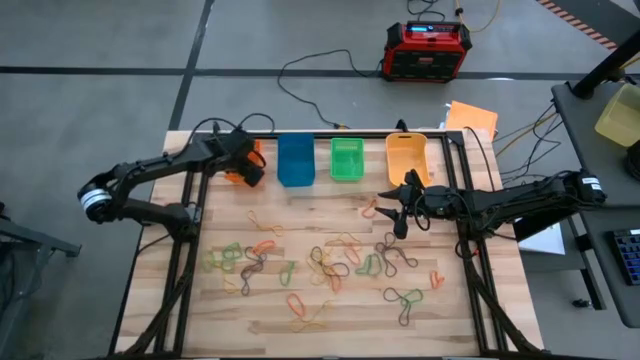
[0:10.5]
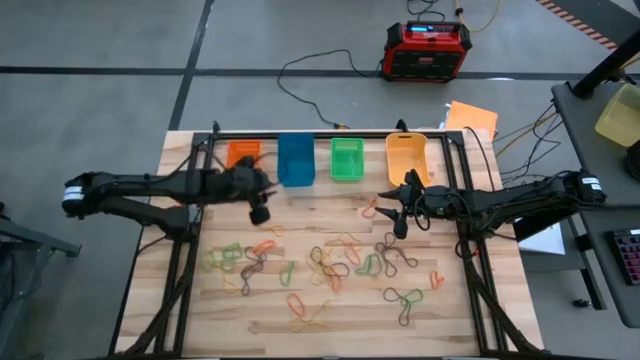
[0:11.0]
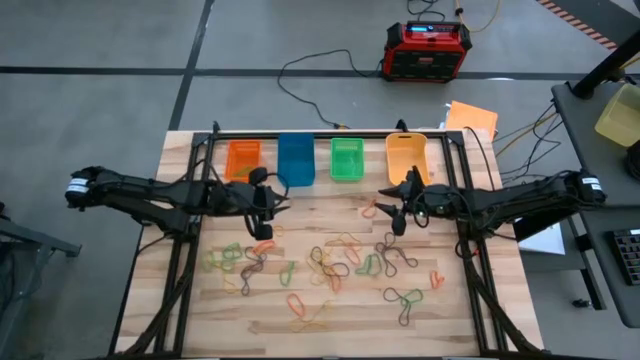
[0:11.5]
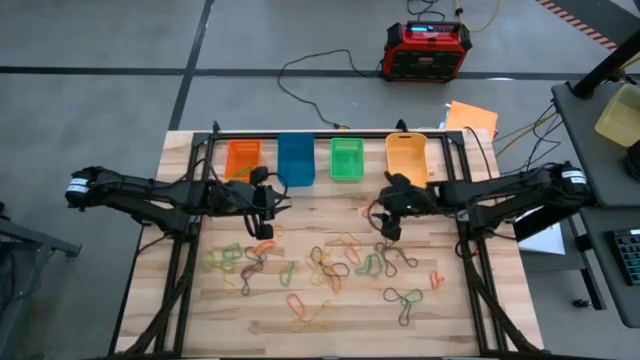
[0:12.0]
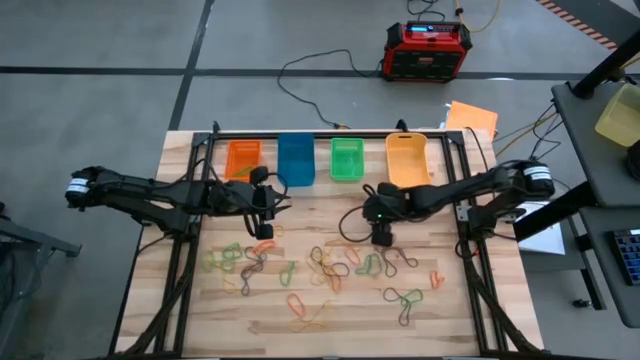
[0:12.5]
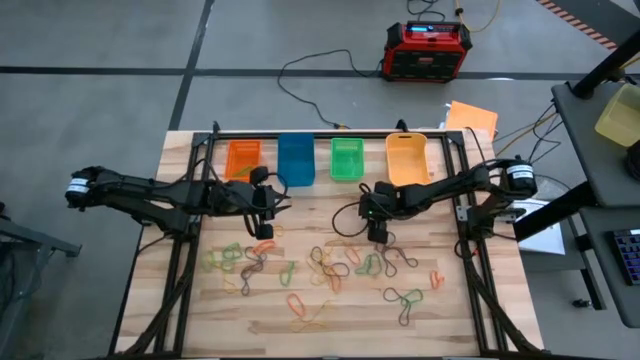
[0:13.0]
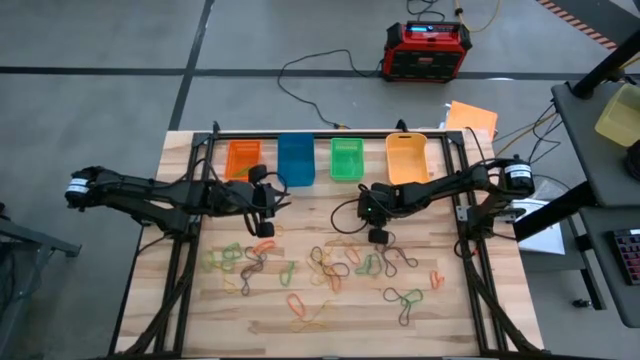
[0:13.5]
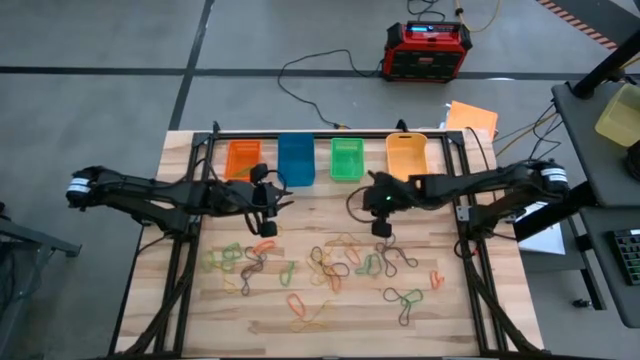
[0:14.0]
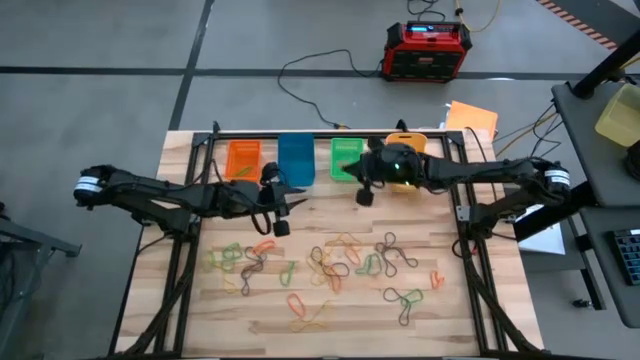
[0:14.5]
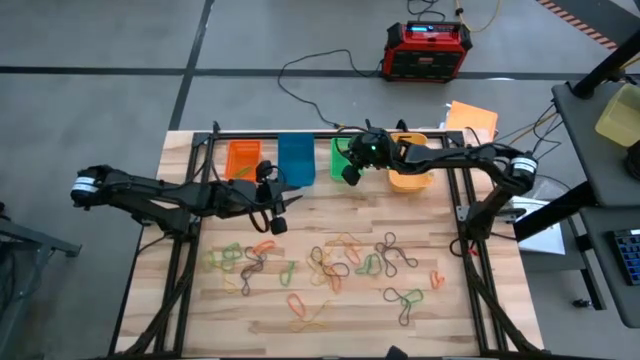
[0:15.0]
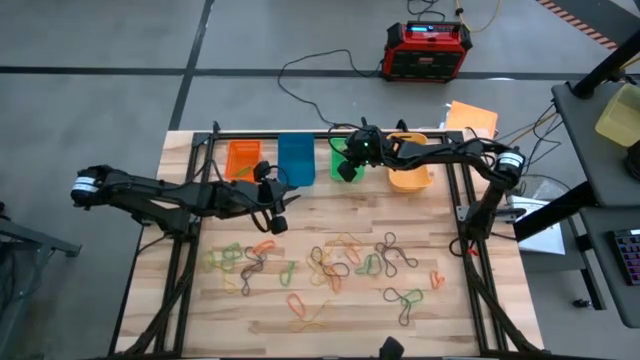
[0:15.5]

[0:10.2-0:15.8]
Task: Sort rubber bands into baskets
Put the orange rubber band into the green bin

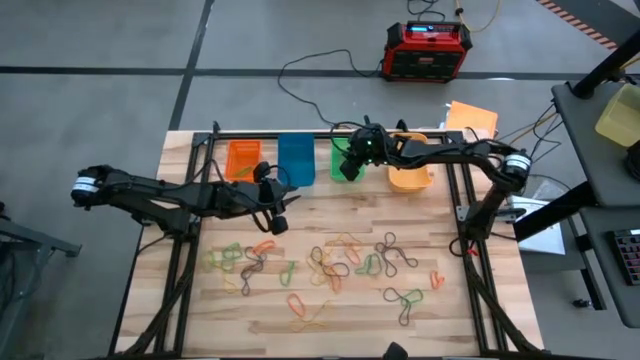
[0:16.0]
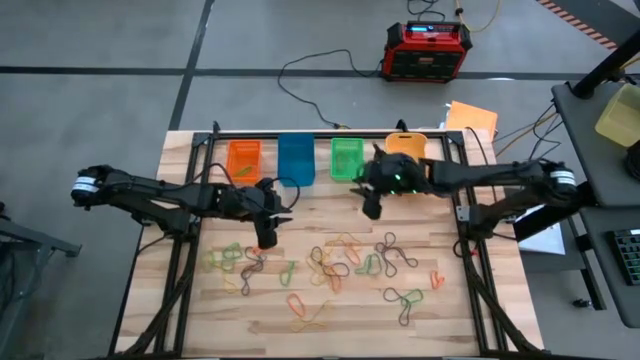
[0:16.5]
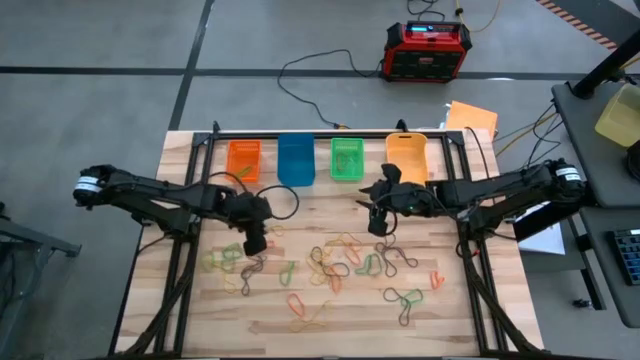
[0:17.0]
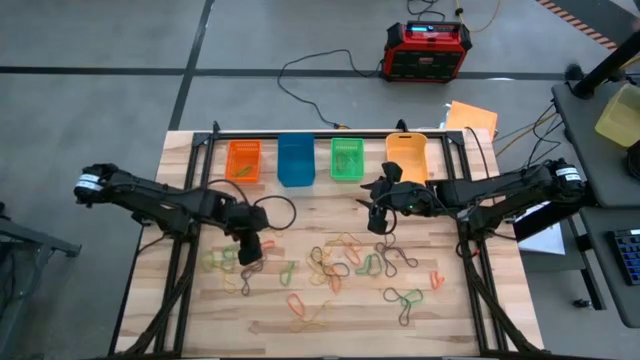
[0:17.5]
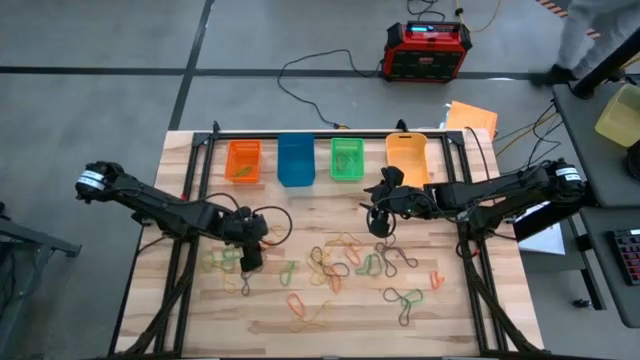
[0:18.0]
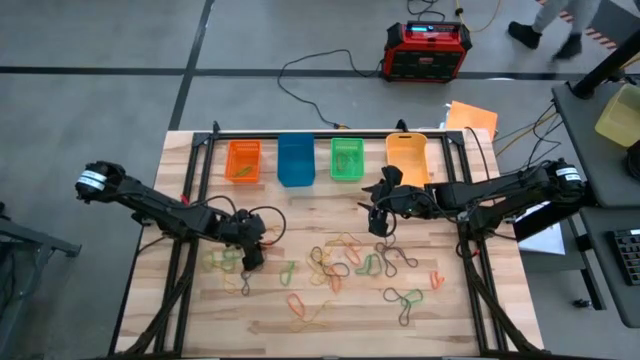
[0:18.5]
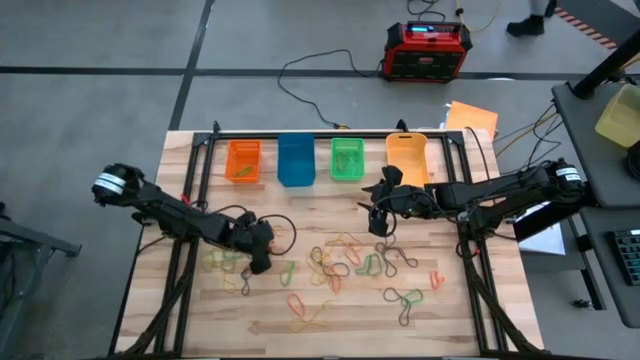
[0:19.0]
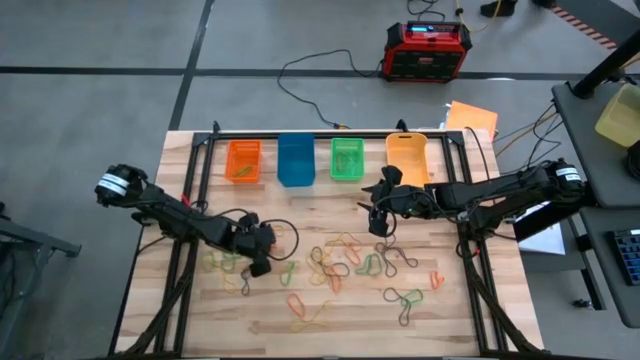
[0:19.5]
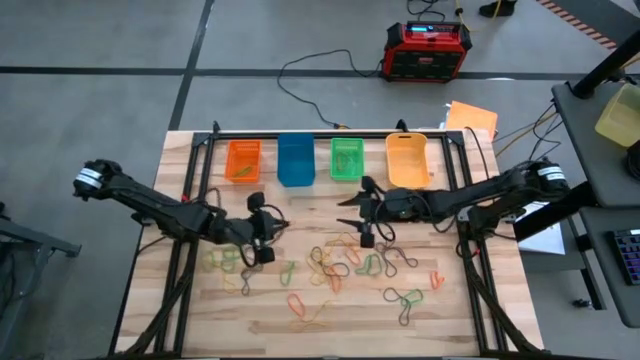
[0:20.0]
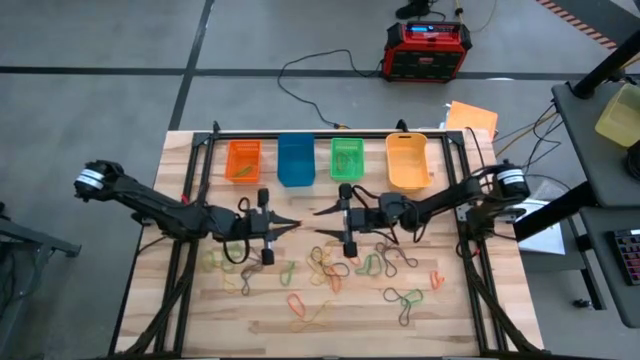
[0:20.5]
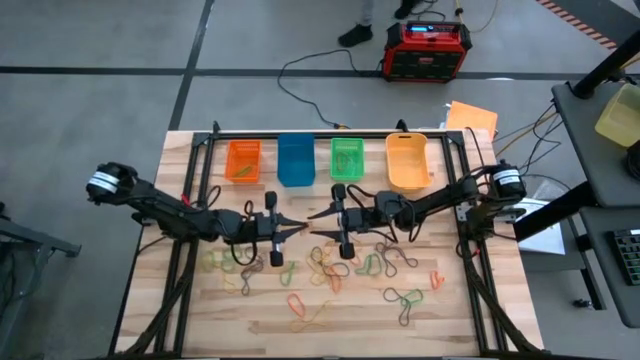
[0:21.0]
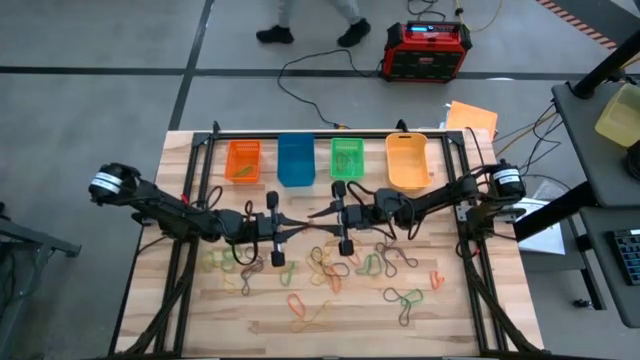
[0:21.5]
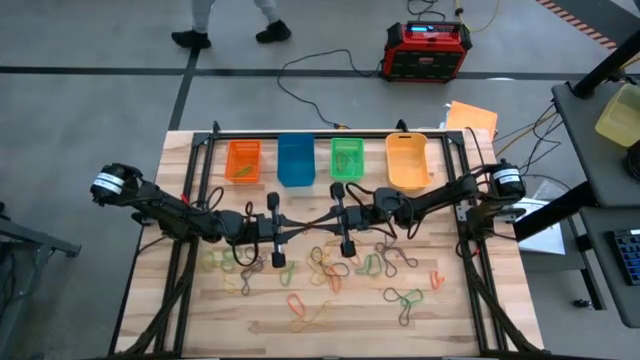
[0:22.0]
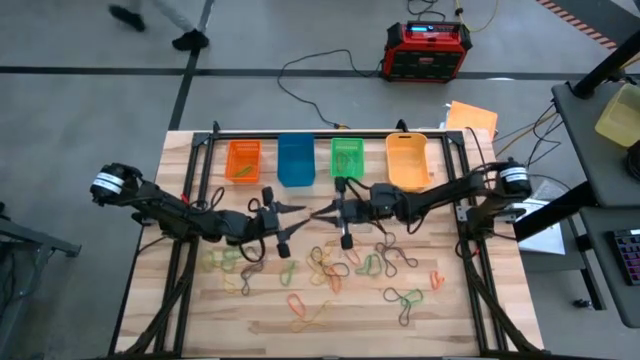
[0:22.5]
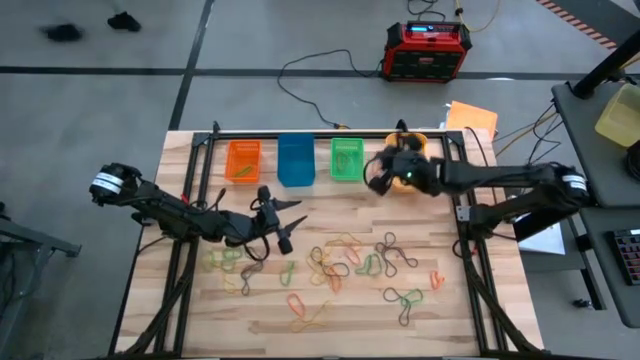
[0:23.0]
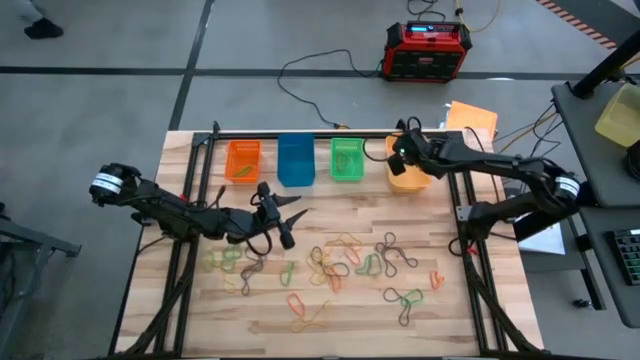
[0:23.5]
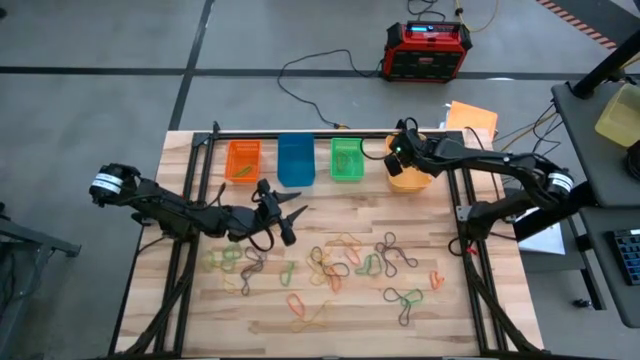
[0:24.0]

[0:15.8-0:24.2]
Put the orange rubber band into the light orange bin

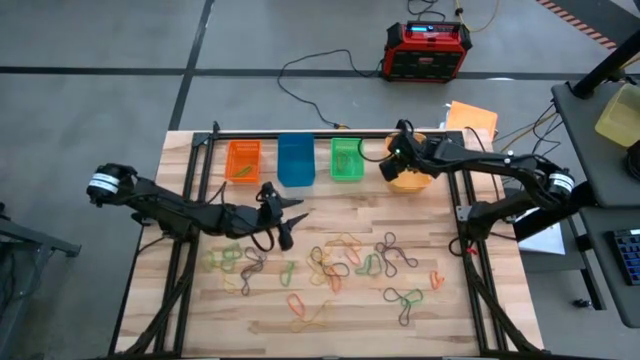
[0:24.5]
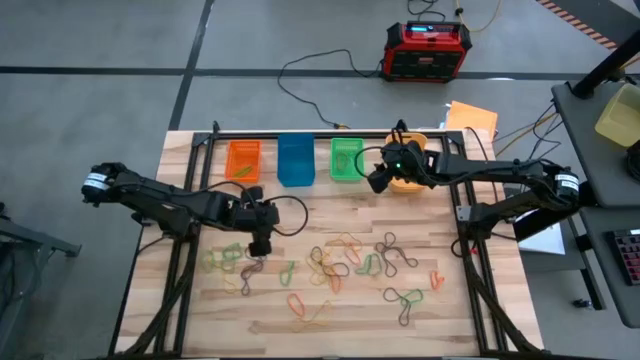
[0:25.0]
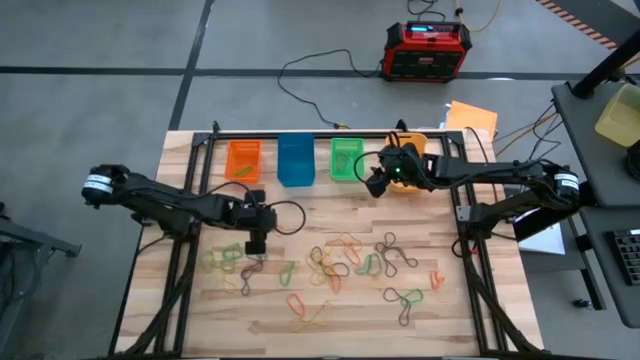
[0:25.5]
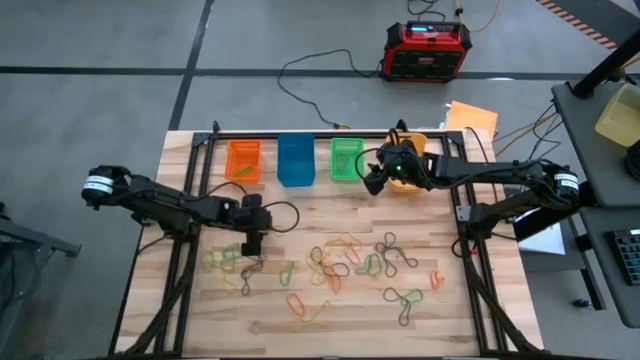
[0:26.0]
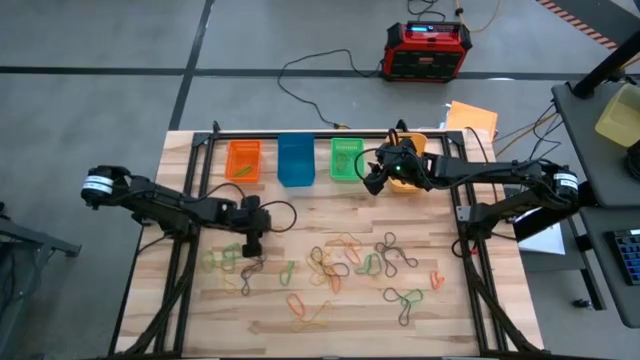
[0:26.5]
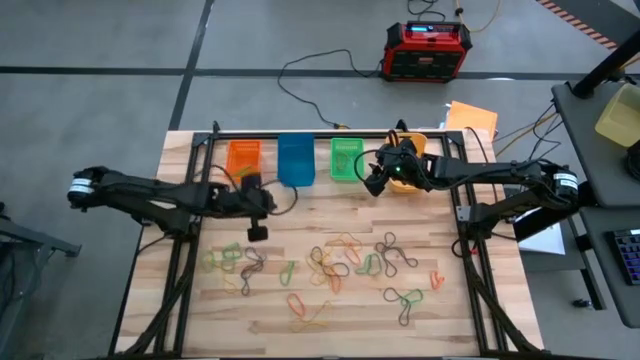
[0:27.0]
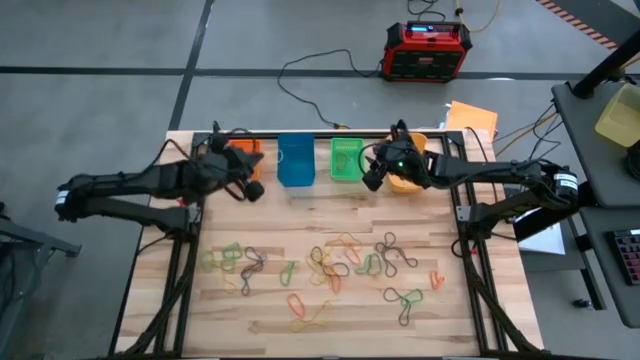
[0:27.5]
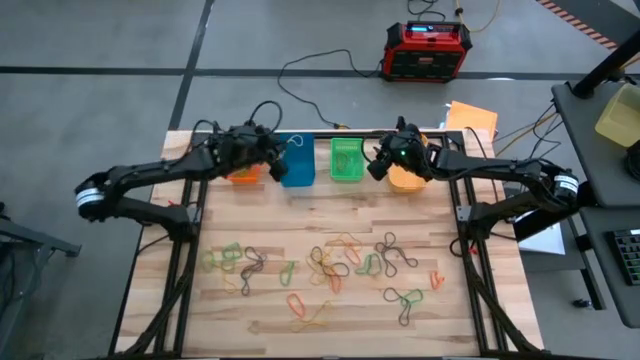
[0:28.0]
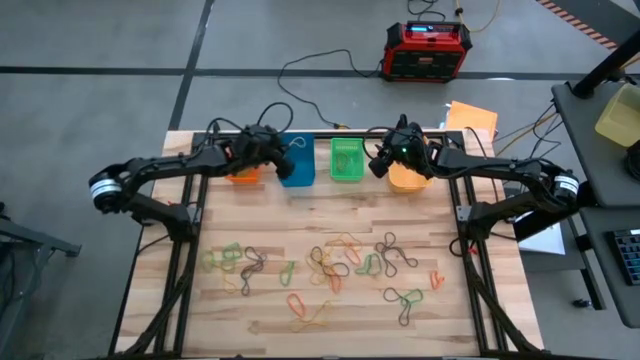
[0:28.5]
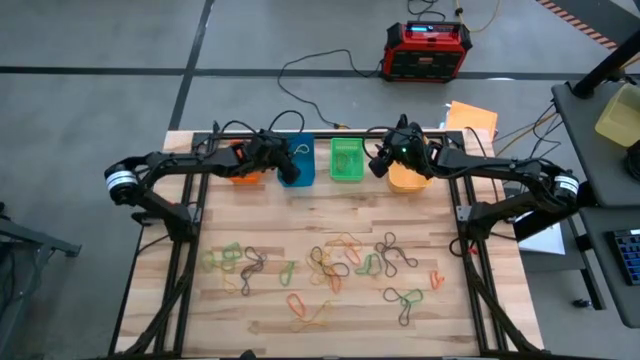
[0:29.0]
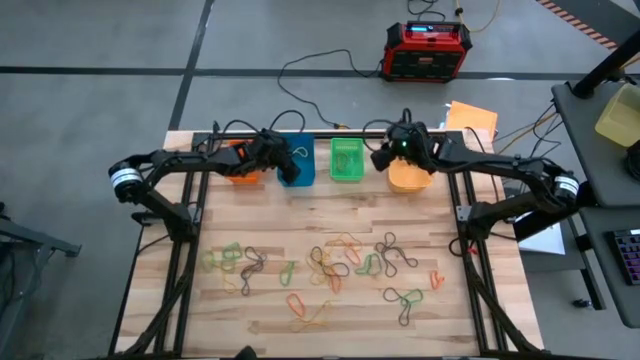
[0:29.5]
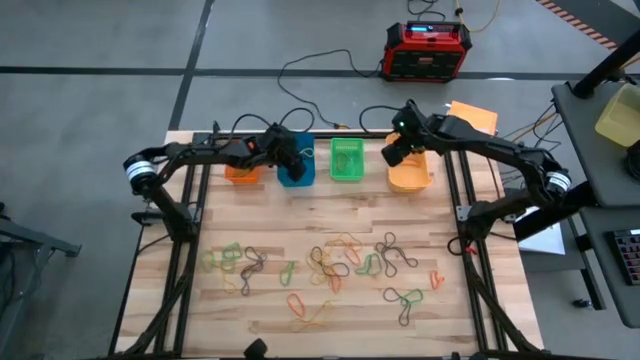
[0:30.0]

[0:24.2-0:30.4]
Put the yellow rubber band into the blue bin

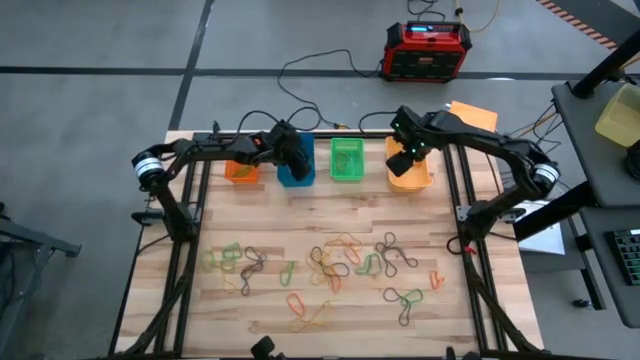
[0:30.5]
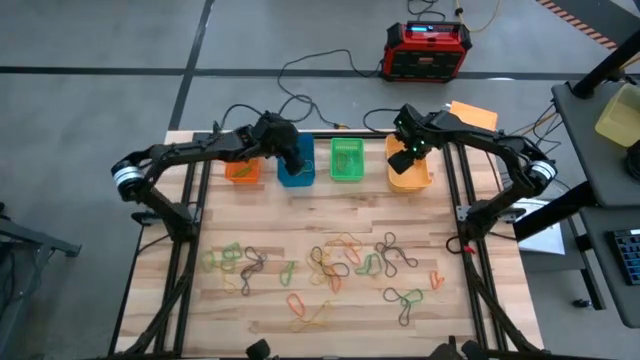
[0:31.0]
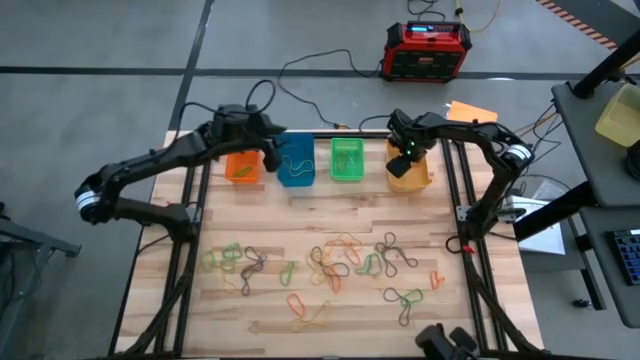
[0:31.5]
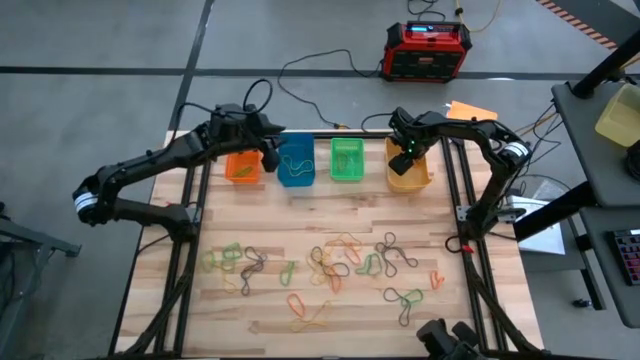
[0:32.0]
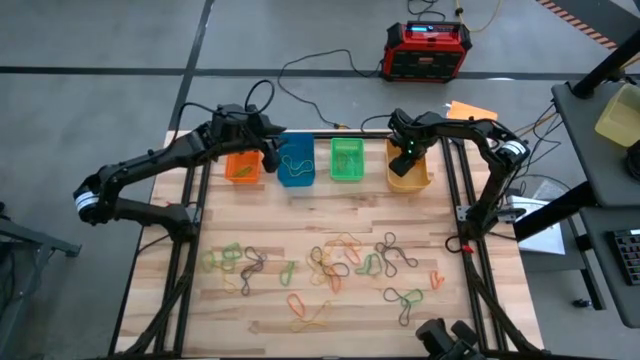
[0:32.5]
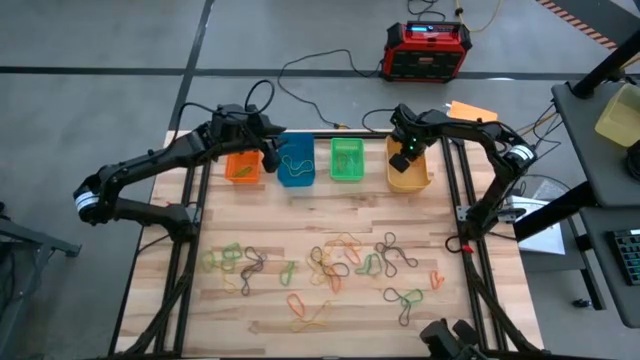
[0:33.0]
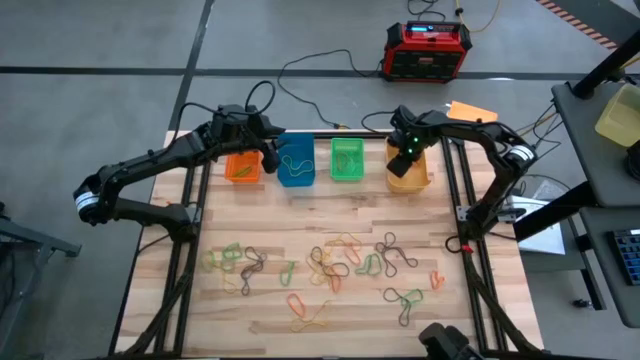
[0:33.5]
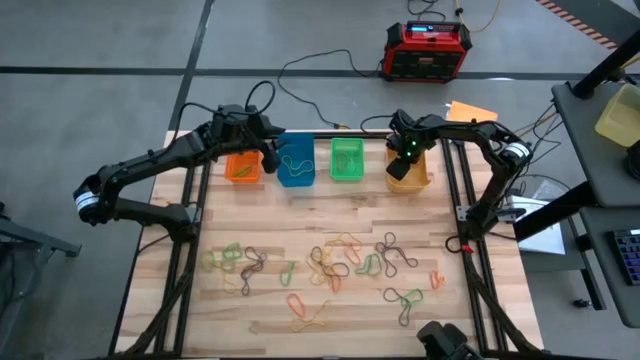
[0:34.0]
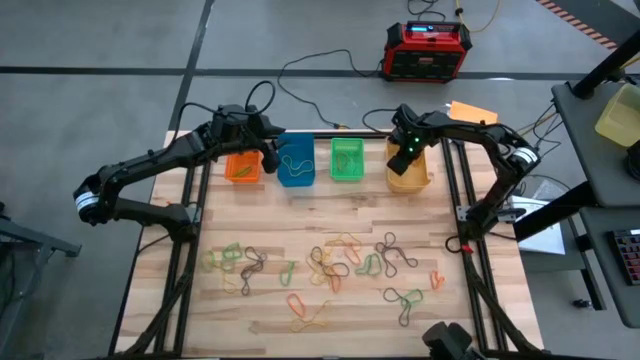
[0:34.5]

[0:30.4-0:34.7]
Put the orange rubber band from the light orange bin into the green bin
